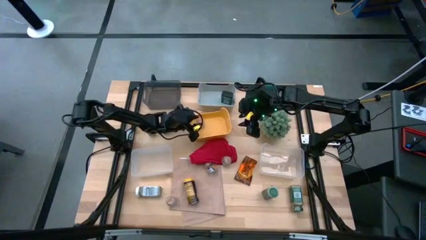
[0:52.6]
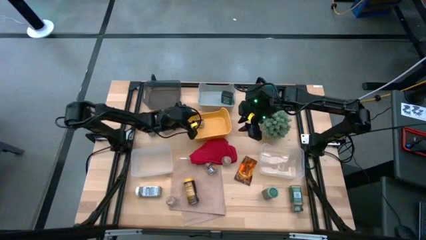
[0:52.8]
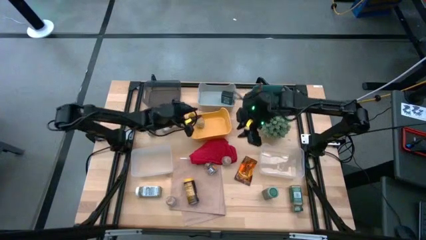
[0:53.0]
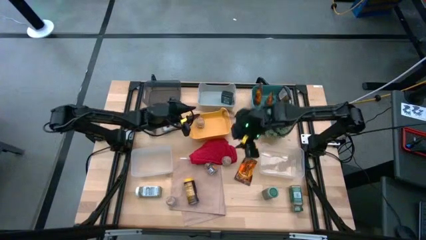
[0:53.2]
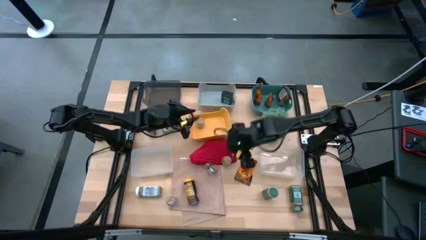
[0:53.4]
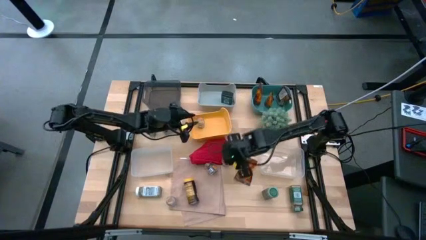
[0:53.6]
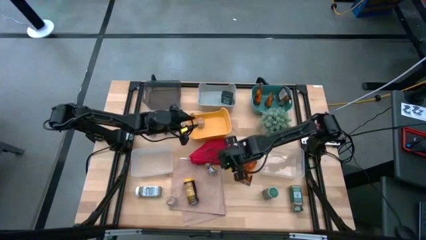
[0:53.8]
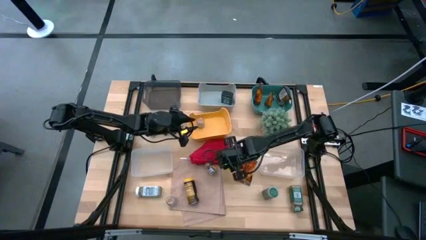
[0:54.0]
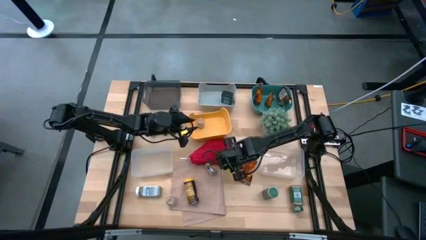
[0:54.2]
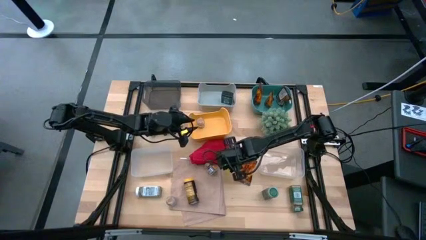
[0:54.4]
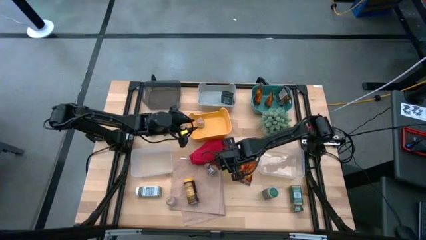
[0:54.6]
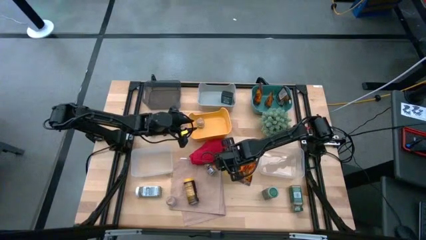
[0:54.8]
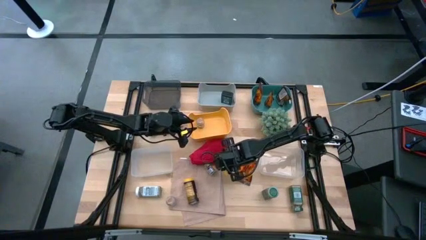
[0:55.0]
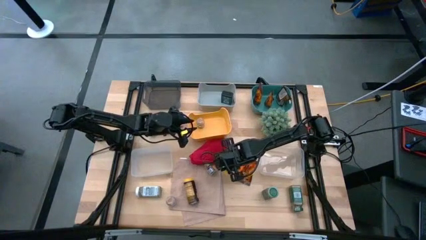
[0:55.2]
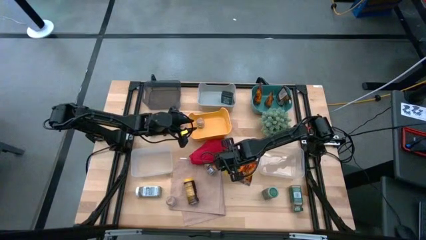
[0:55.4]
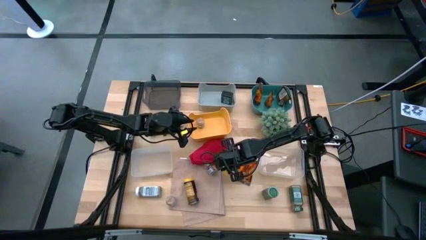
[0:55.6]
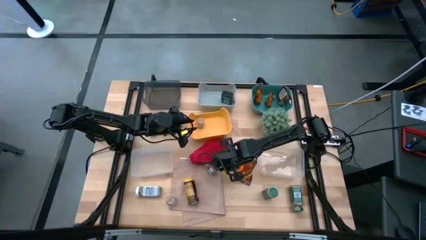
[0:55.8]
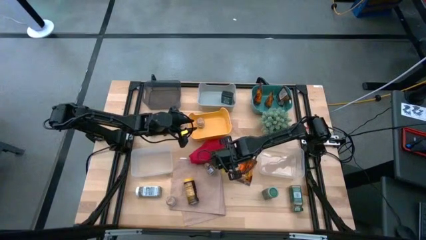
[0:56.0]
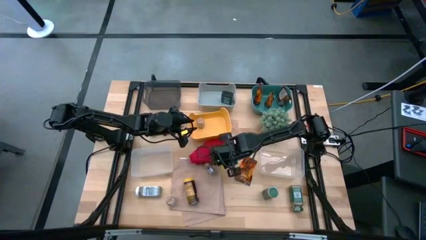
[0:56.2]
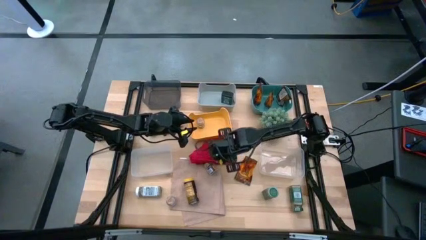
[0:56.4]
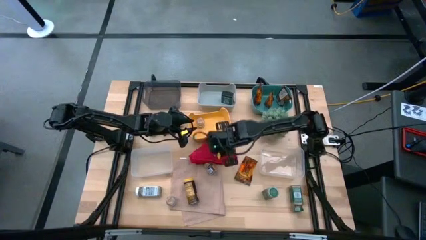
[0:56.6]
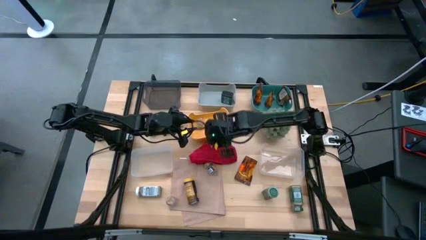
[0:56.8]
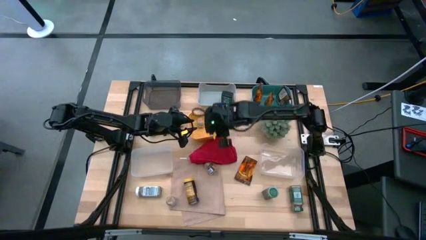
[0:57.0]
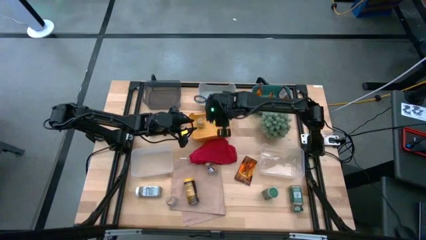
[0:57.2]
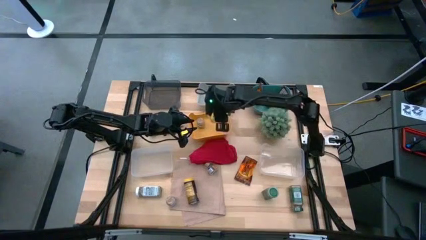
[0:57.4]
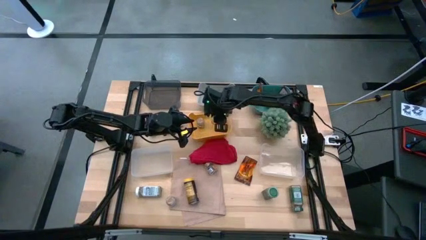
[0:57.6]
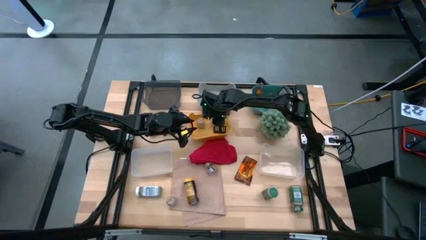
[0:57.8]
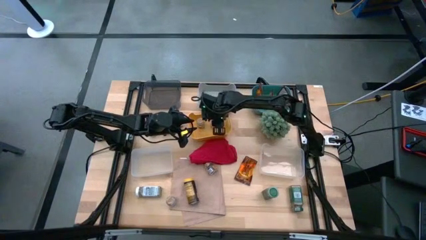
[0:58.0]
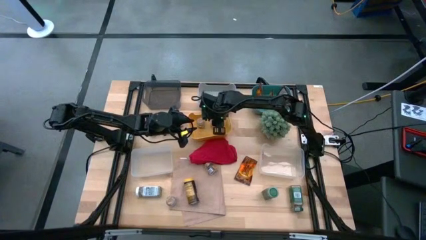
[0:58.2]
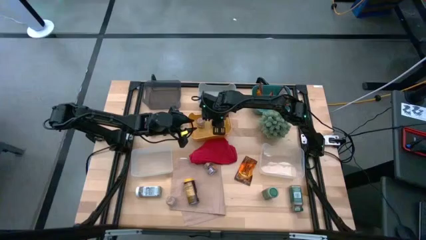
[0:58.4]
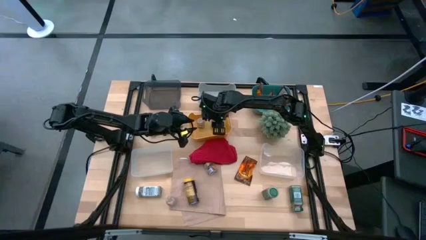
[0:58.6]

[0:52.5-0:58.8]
Task: Sort spices by type
Put the brown seasoning bottle into the yellow bin

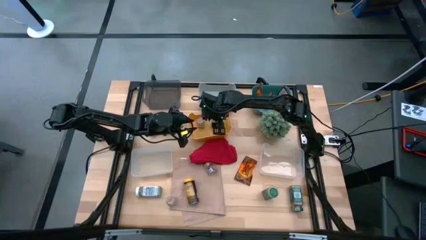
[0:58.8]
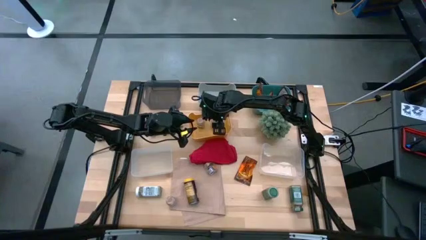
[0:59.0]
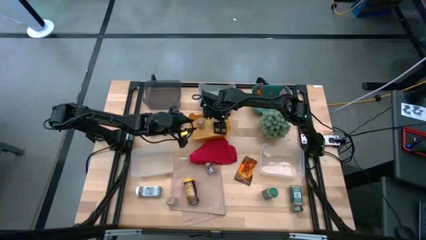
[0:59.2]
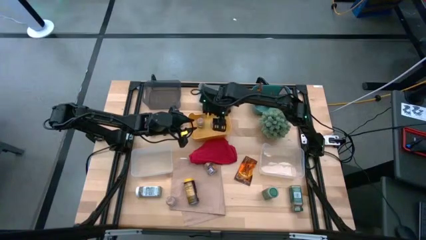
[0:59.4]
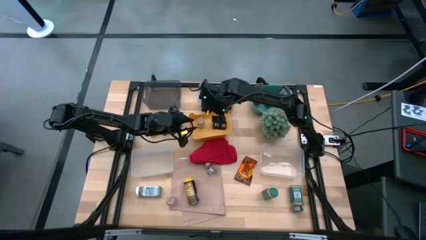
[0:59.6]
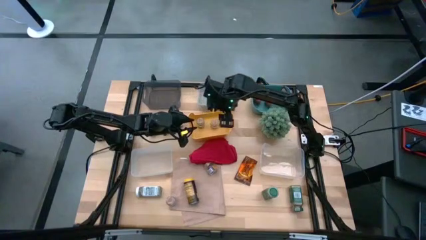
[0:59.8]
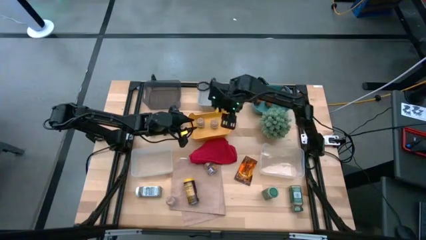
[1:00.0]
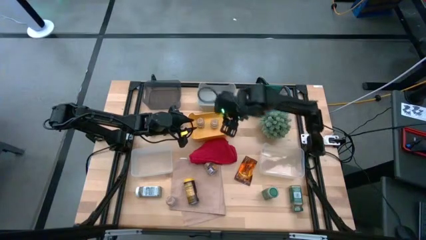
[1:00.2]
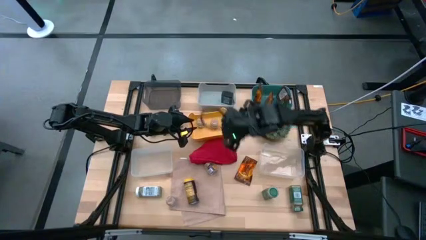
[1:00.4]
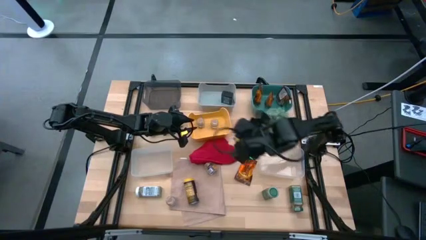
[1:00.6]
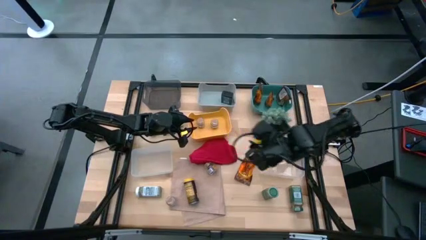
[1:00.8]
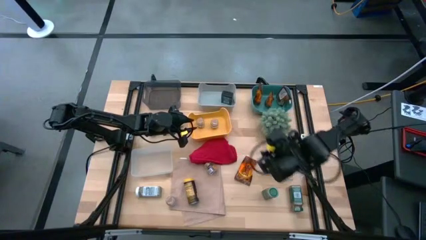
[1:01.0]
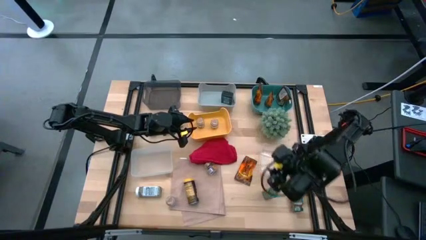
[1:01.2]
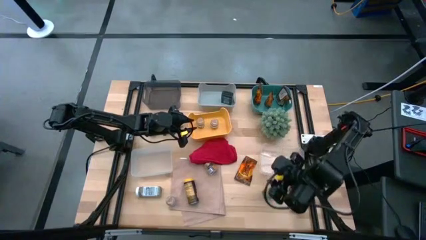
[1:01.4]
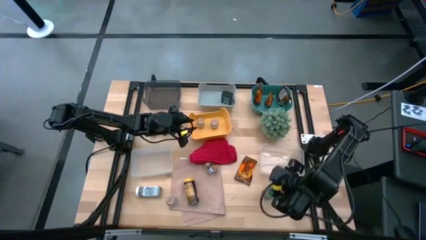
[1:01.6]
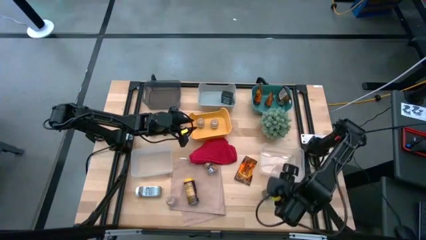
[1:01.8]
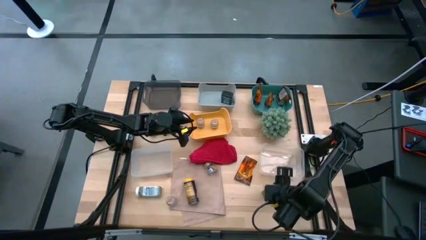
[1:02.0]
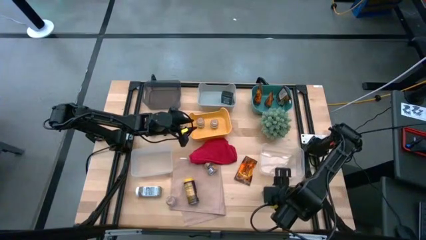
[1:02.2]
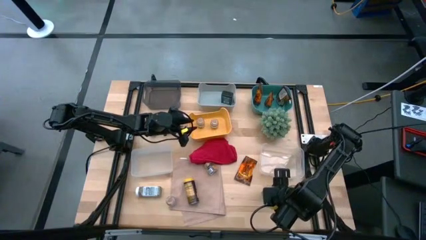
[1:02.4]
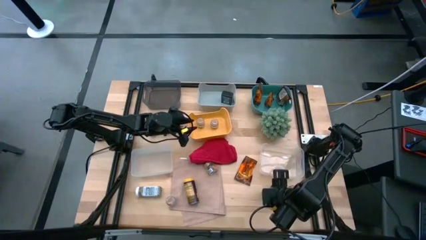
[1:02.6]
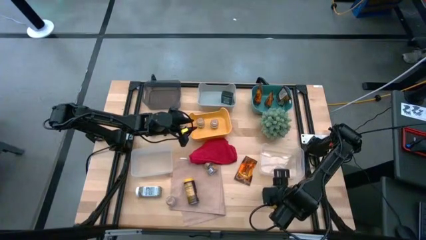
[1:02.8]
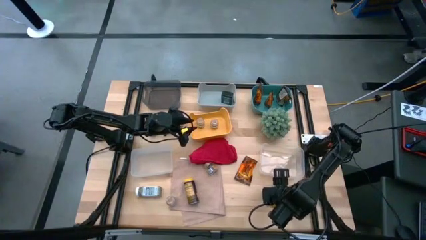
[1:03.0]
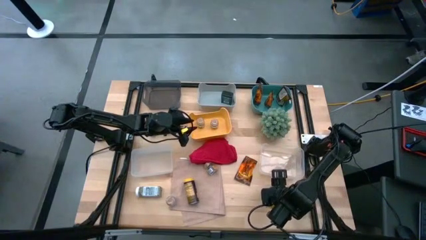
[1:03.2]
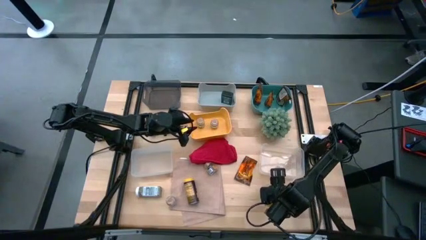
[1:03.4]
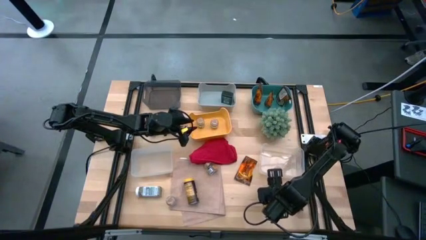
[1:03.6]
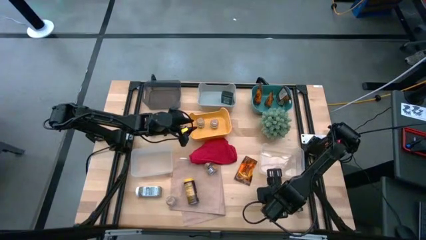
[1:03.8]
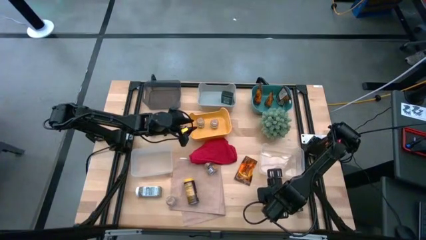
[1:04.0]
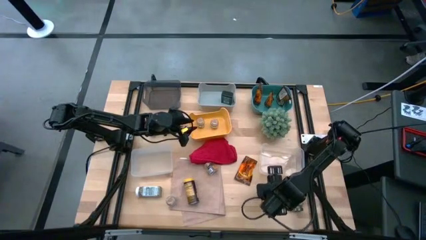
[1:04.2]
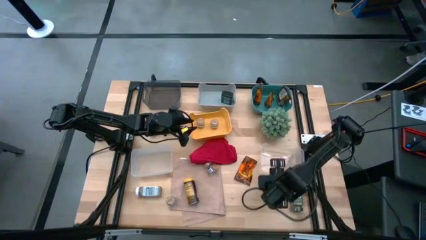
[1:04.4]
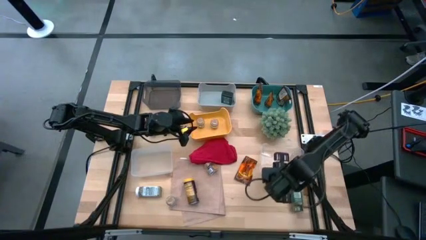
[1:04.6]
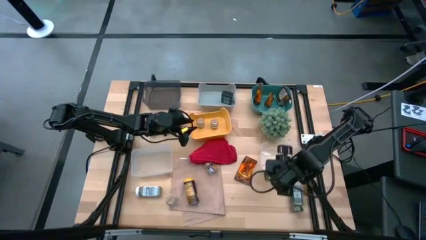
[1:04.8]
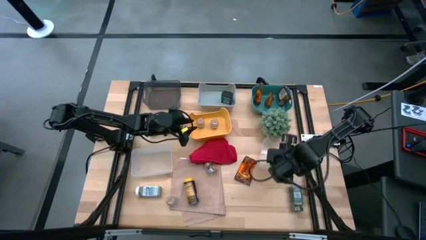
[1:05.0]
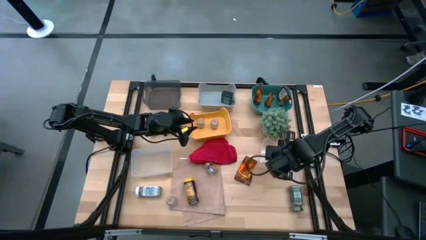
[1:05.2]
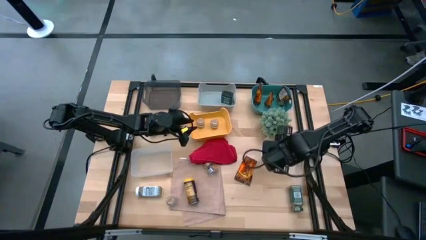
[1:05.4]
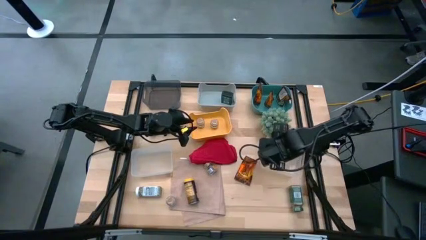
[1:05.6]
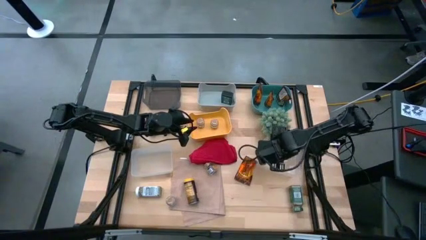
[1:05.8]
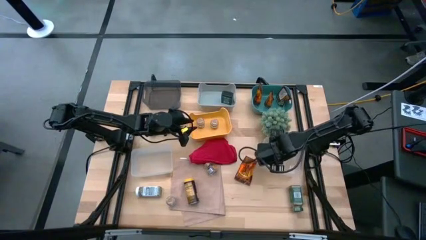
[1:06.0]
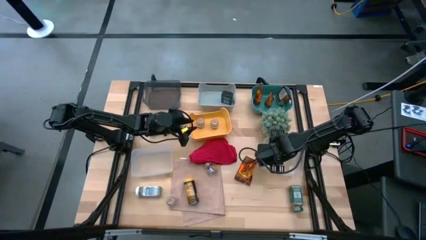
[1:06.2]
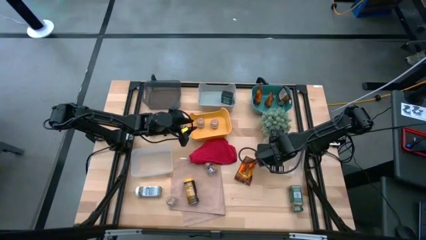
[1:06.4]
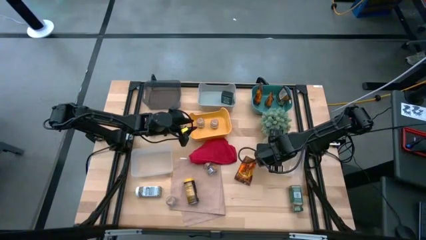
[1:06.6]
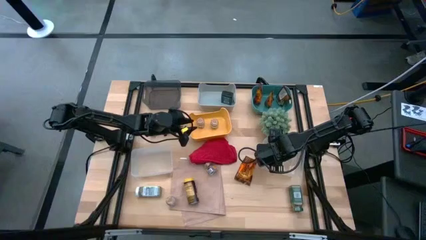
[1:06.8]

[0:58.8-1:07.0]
Put the green seasoning bottle into the right transparent bin
